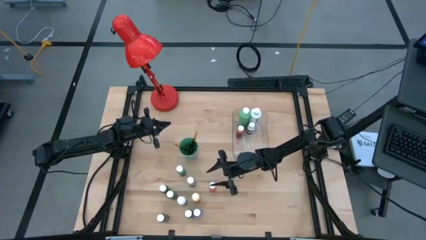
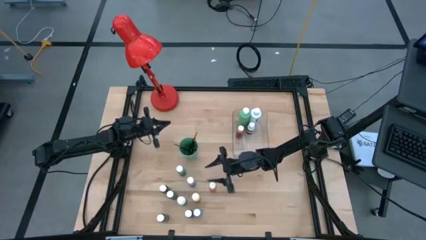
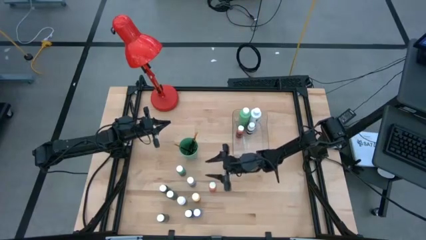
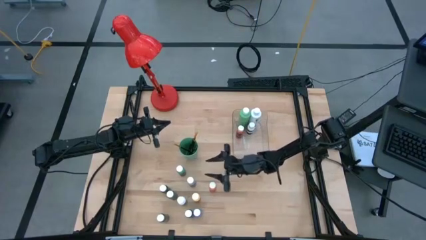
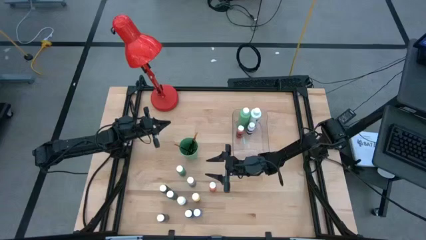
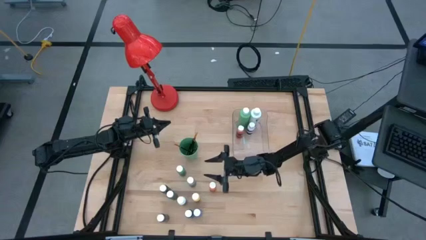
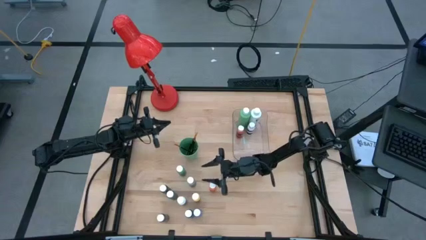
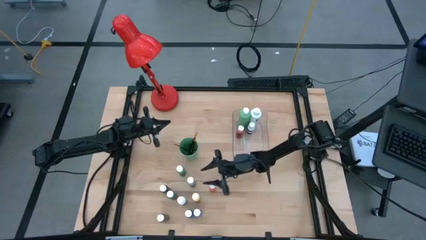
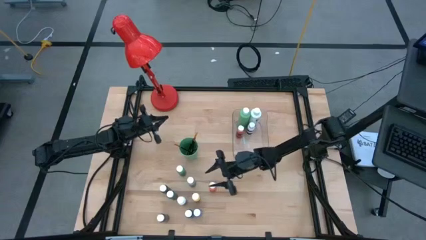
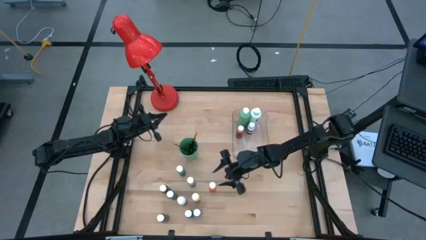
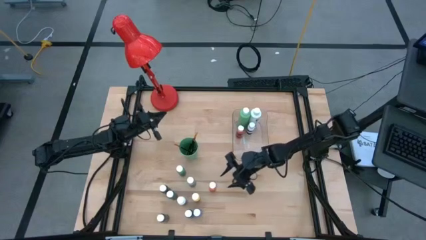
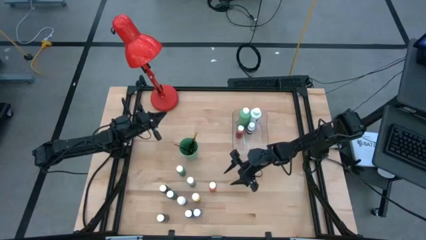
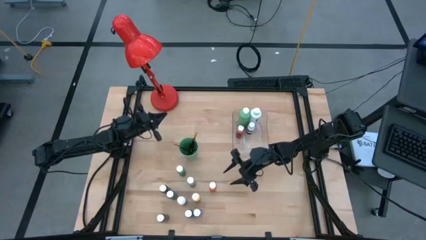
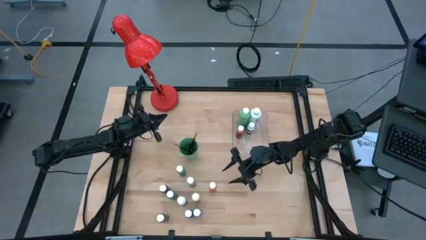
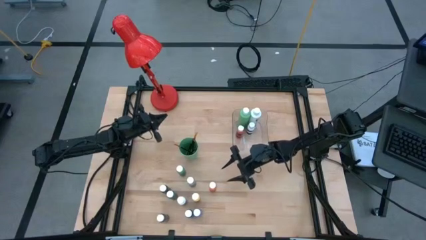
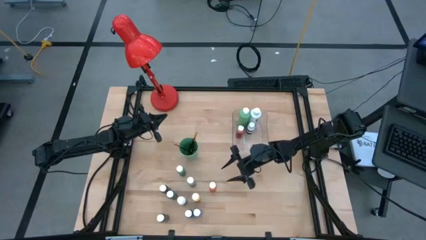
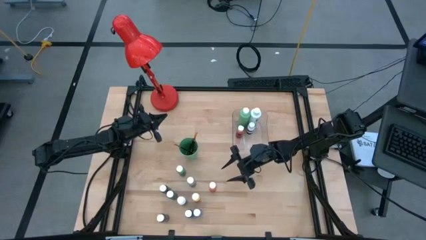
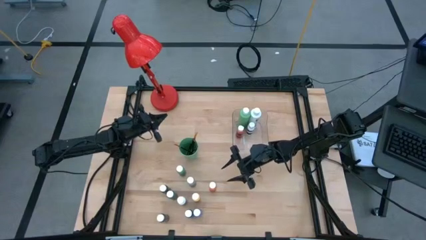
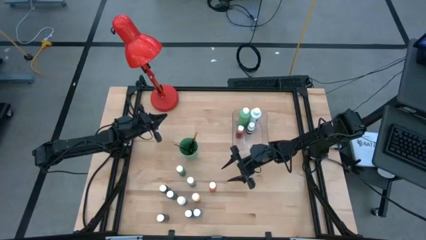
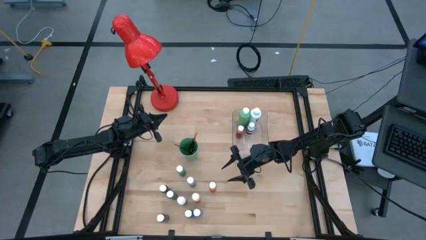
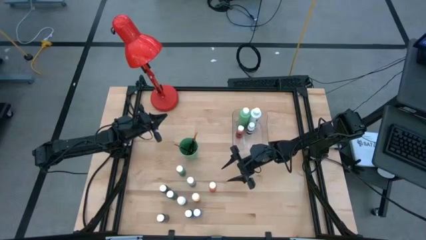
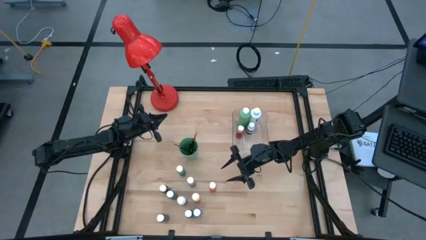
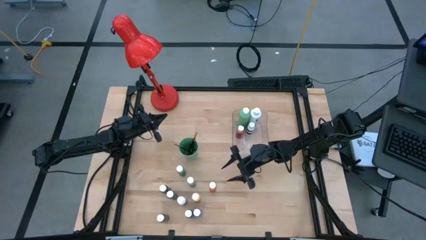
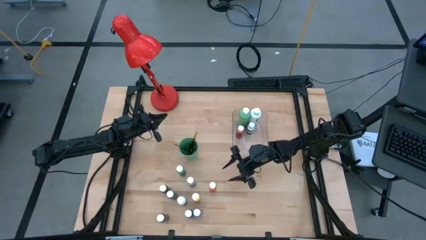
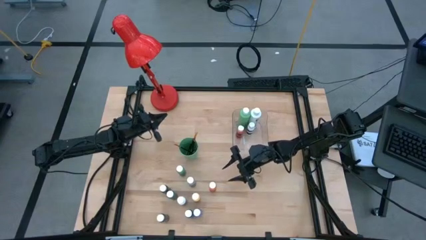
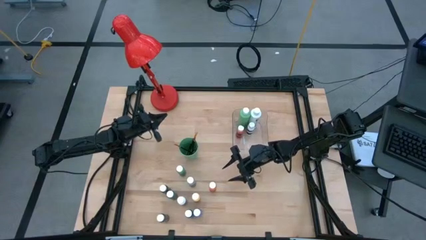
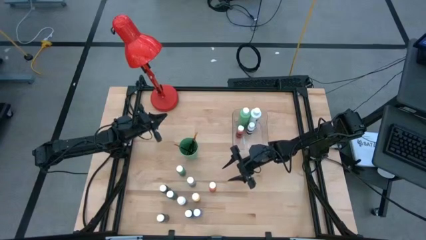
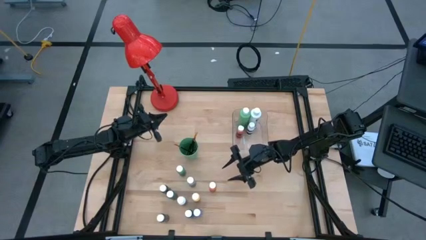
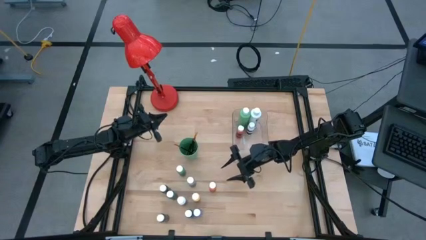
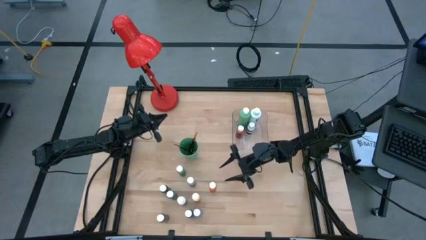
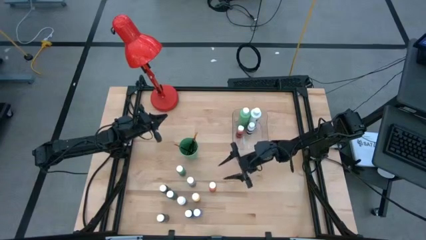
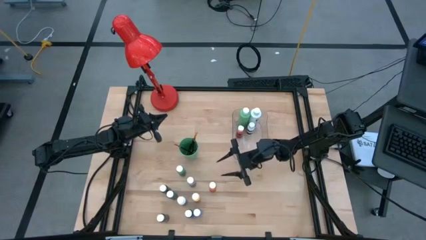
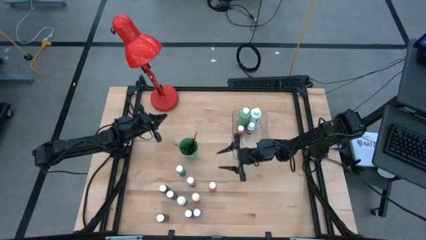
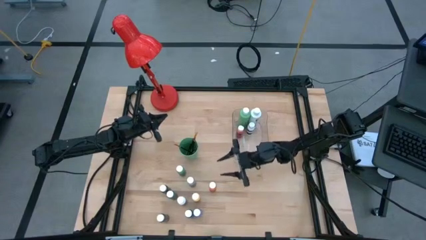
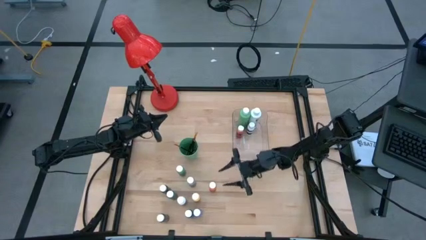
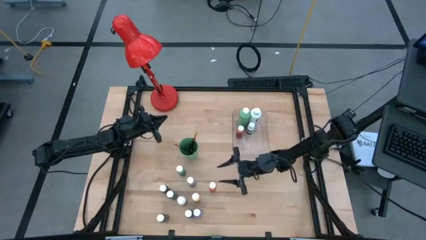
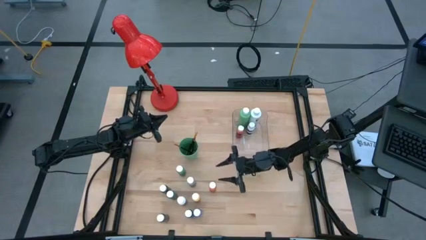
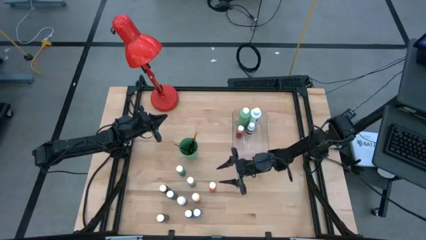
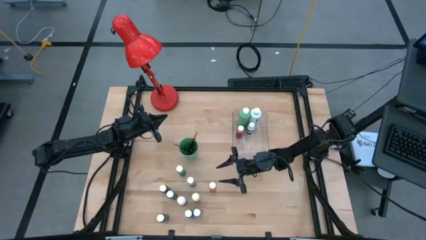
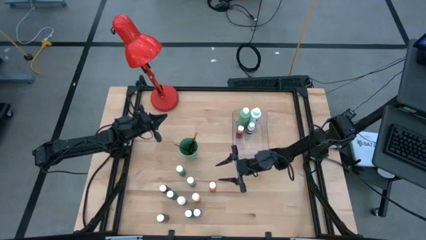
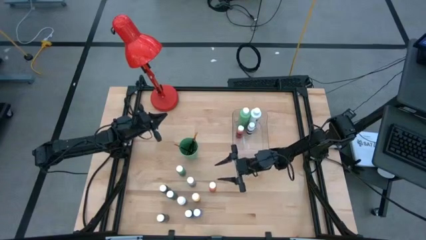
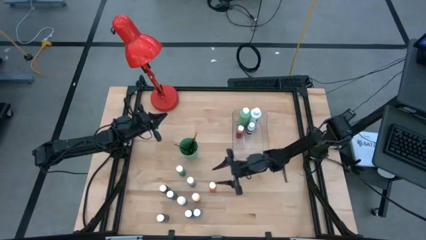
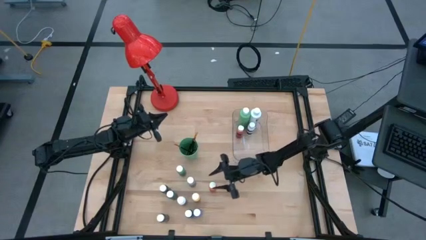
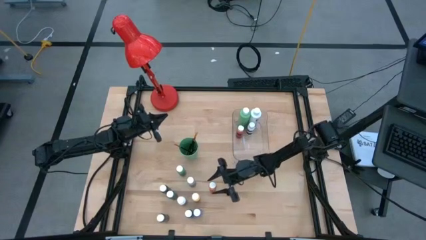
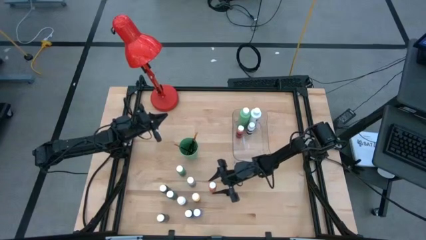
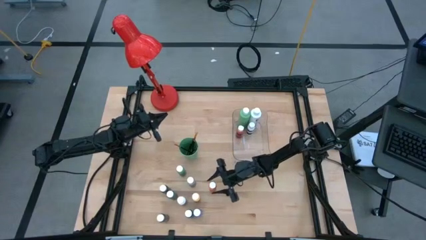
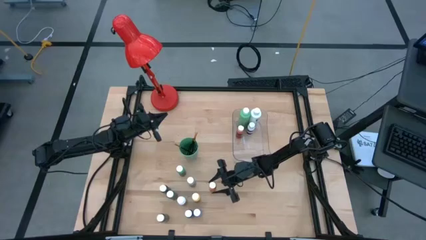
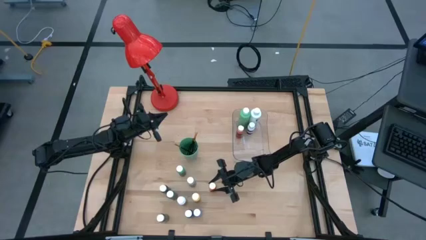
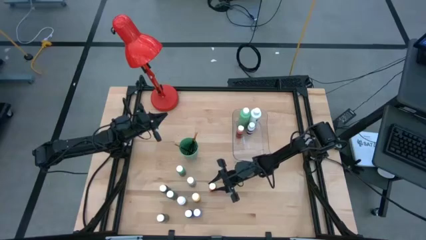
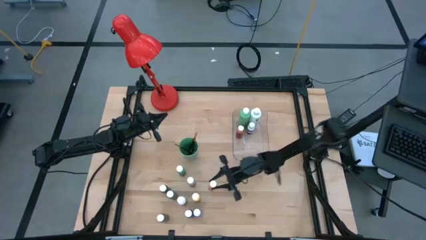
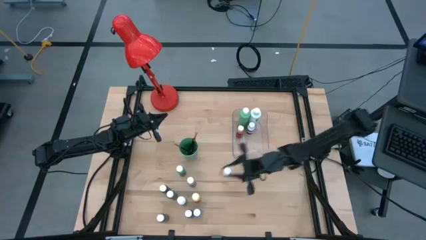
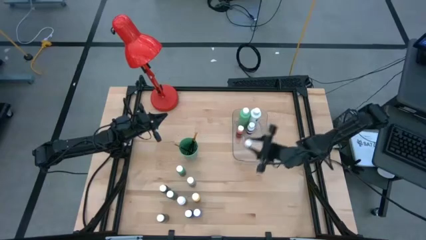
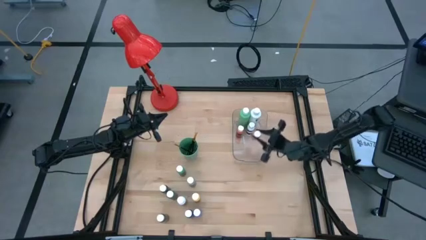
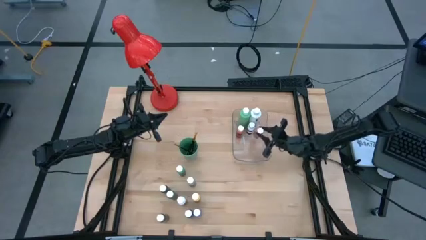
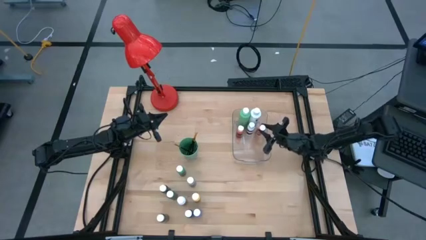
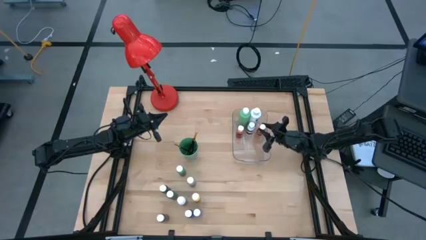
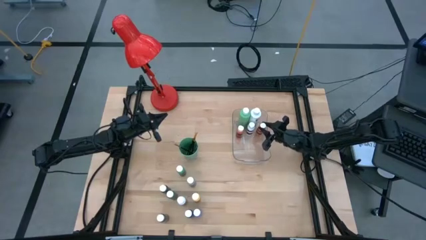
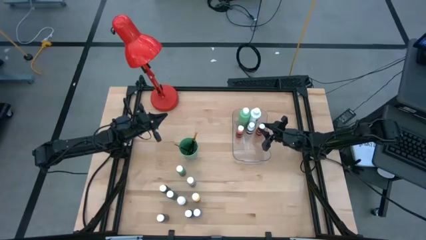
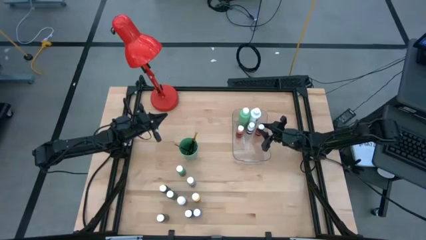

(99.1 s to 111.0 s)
Task: Pick & Place Paint Supplies
Put the small orange paint bottle into the transparent bin
